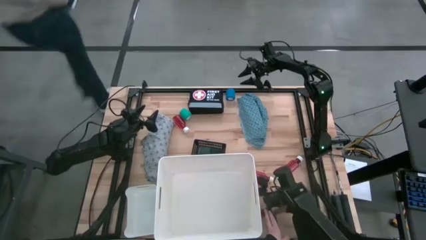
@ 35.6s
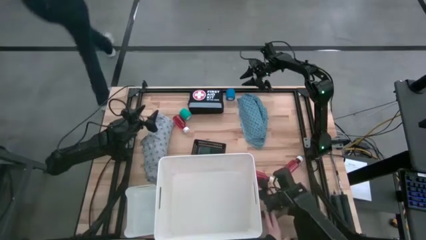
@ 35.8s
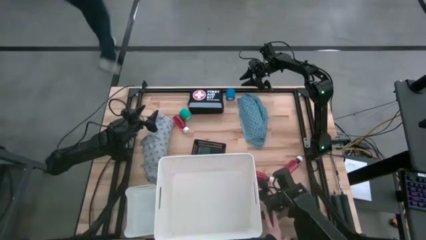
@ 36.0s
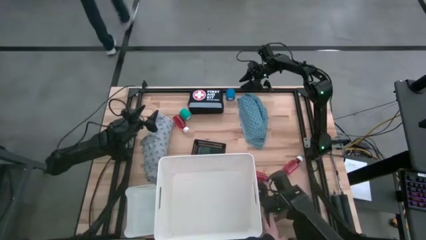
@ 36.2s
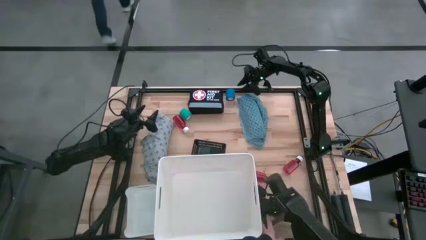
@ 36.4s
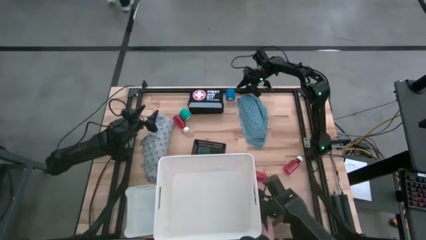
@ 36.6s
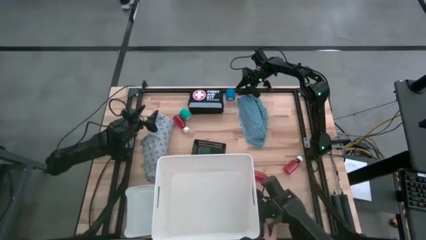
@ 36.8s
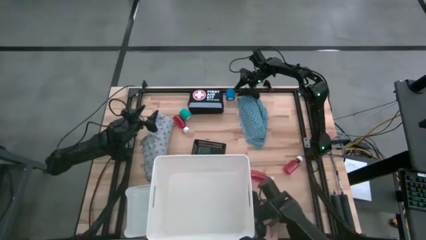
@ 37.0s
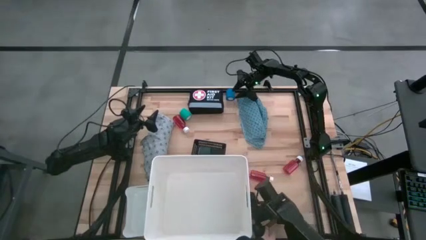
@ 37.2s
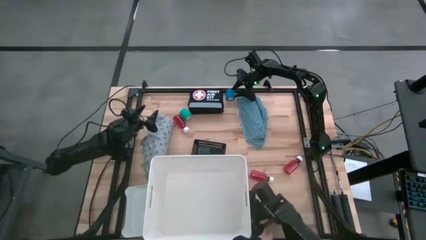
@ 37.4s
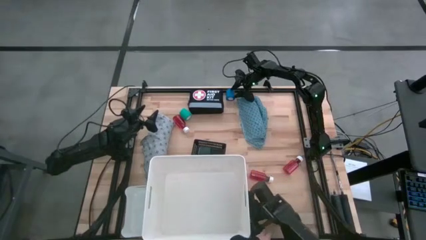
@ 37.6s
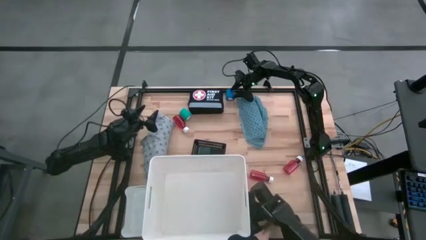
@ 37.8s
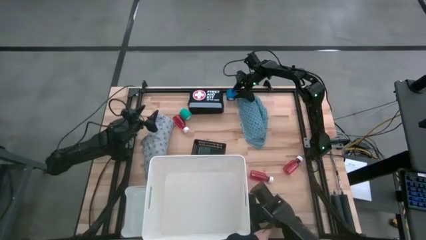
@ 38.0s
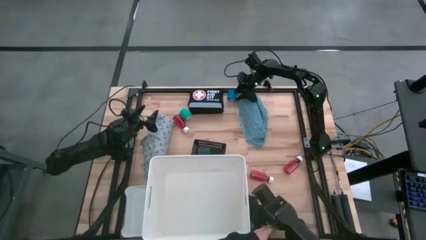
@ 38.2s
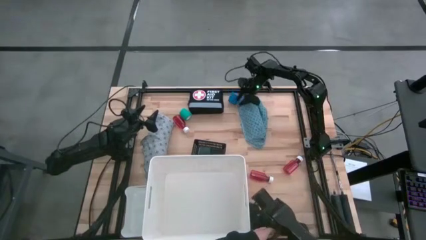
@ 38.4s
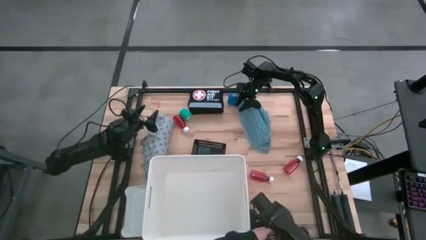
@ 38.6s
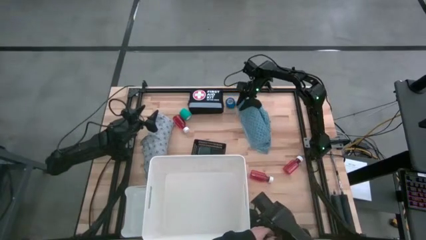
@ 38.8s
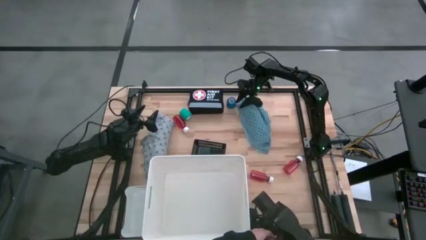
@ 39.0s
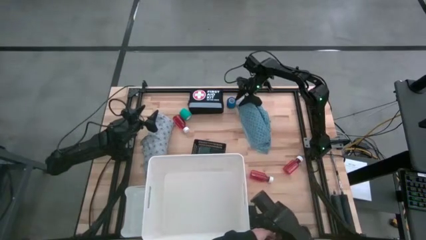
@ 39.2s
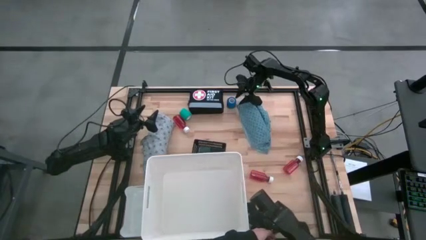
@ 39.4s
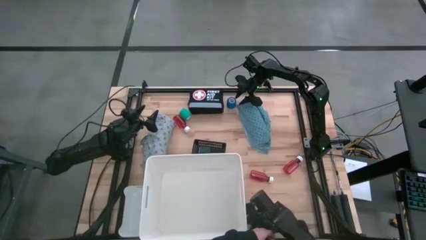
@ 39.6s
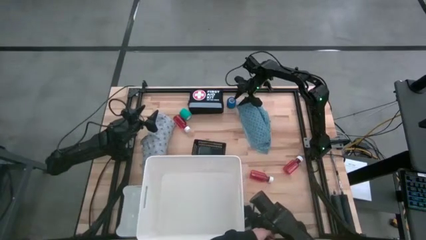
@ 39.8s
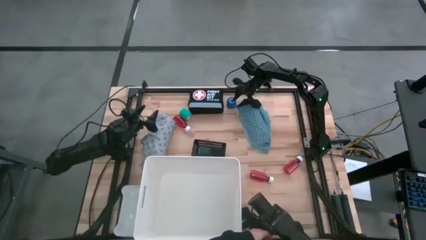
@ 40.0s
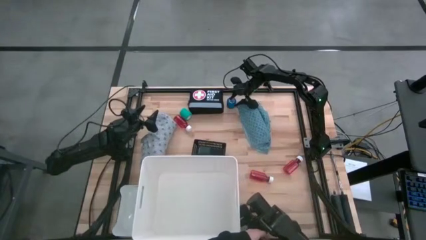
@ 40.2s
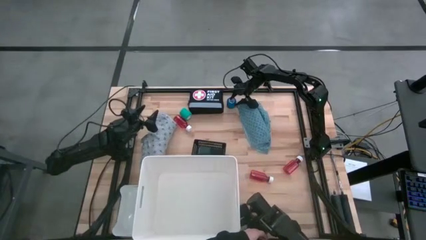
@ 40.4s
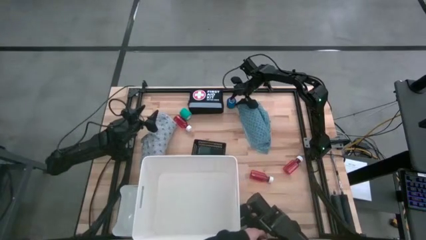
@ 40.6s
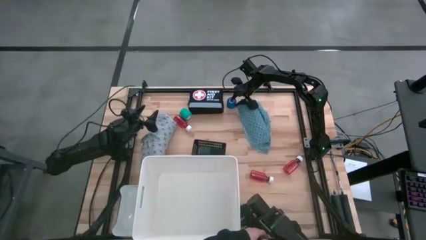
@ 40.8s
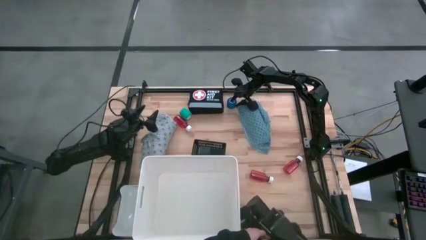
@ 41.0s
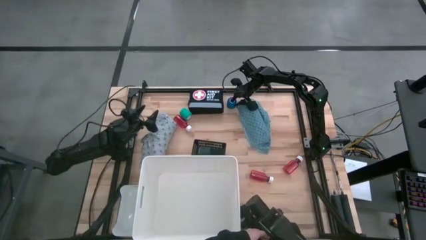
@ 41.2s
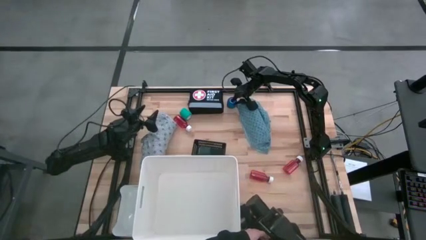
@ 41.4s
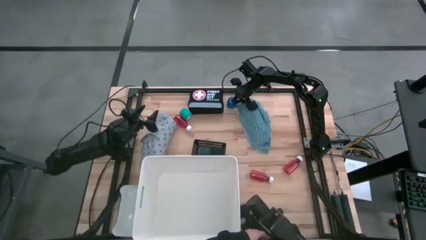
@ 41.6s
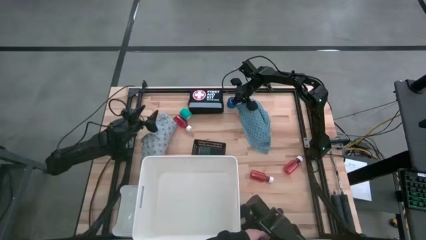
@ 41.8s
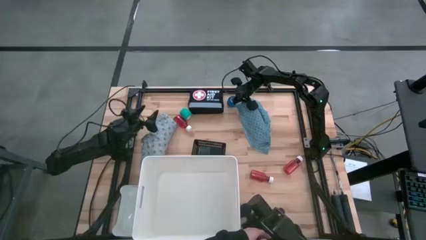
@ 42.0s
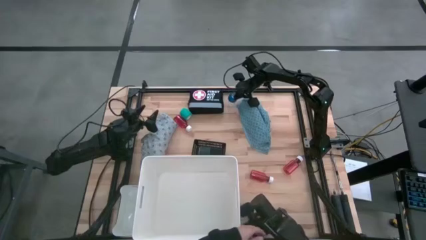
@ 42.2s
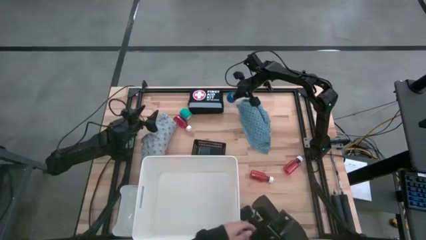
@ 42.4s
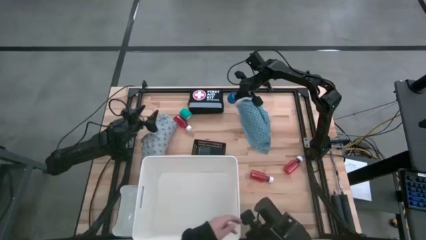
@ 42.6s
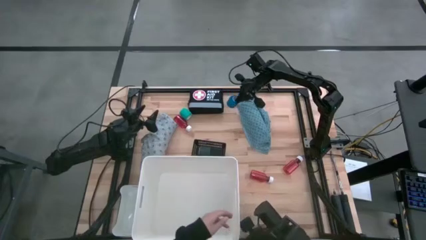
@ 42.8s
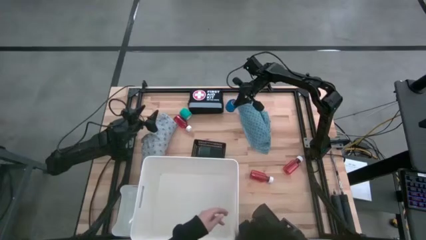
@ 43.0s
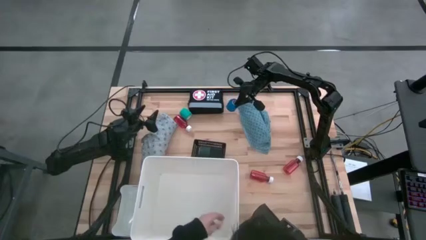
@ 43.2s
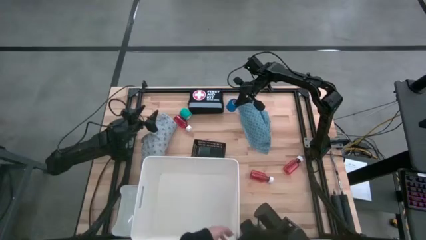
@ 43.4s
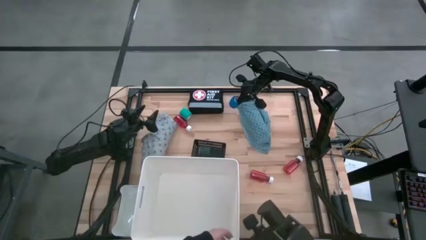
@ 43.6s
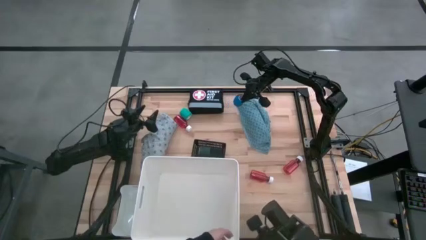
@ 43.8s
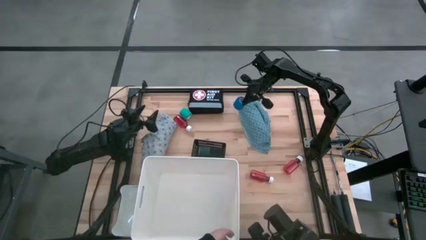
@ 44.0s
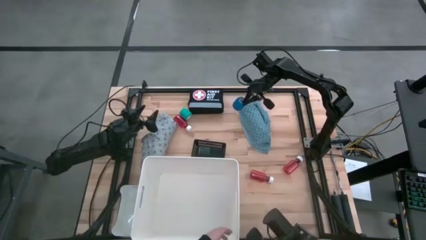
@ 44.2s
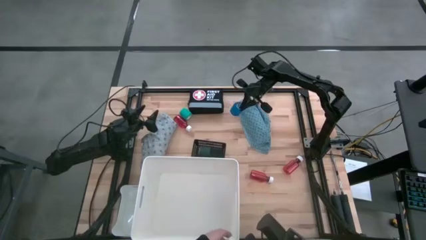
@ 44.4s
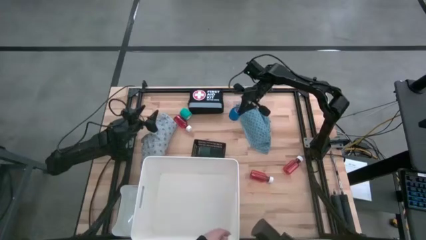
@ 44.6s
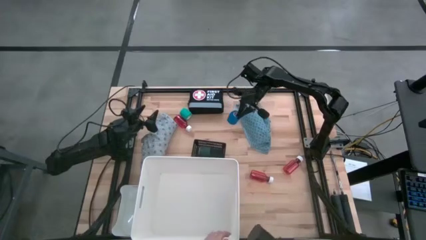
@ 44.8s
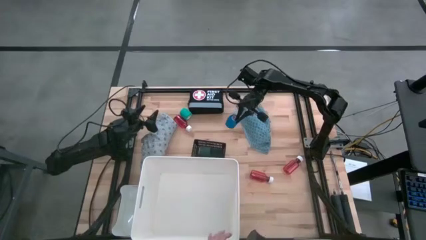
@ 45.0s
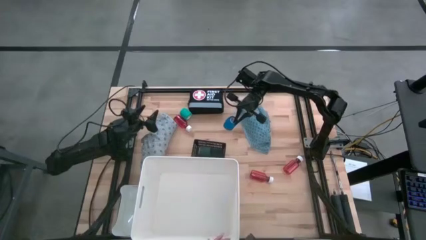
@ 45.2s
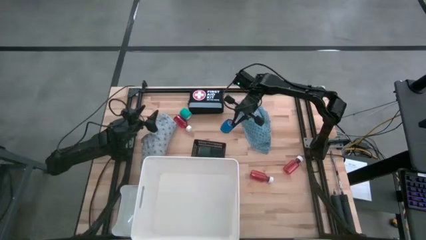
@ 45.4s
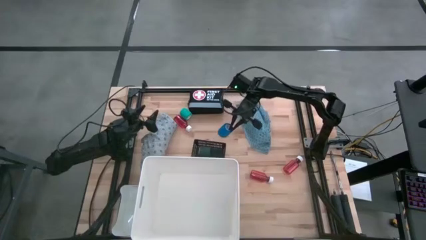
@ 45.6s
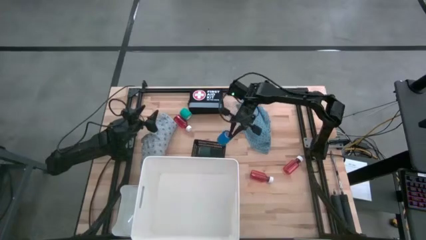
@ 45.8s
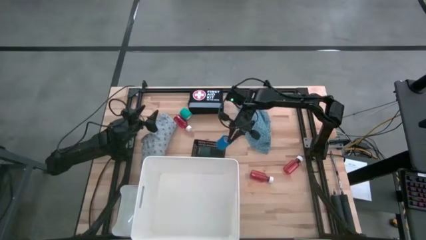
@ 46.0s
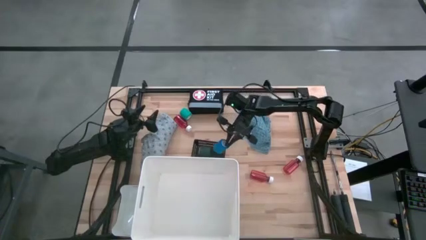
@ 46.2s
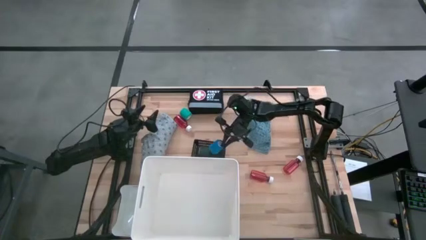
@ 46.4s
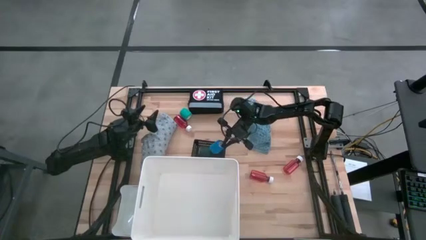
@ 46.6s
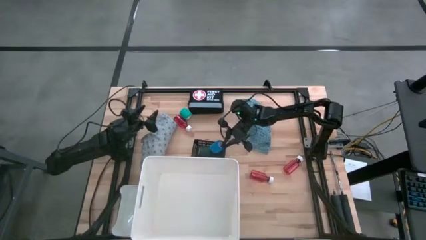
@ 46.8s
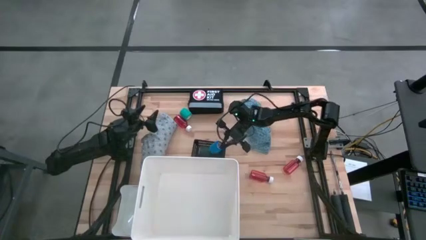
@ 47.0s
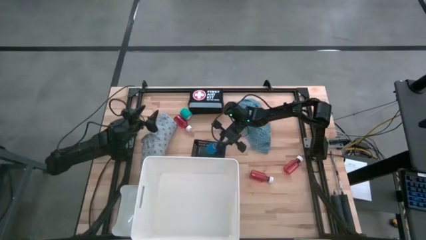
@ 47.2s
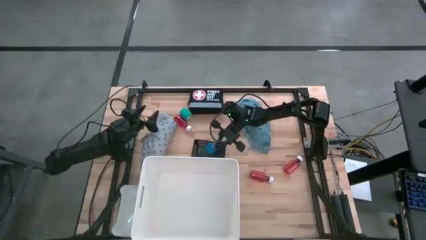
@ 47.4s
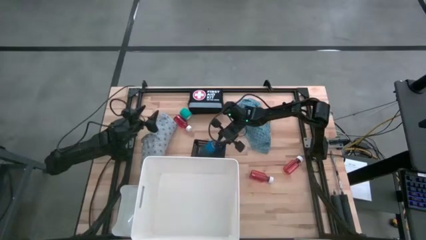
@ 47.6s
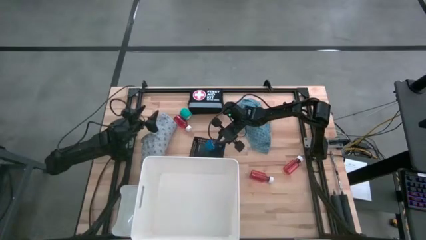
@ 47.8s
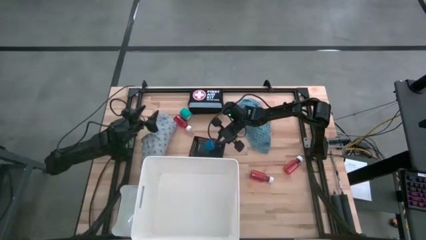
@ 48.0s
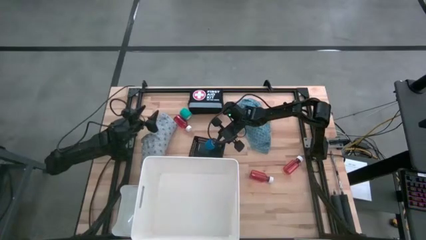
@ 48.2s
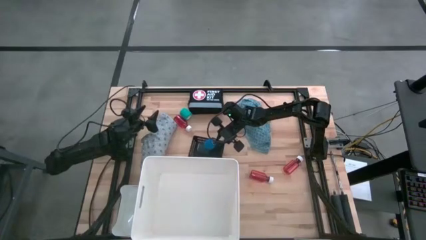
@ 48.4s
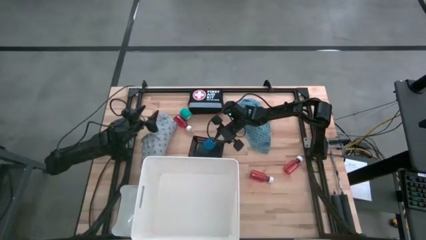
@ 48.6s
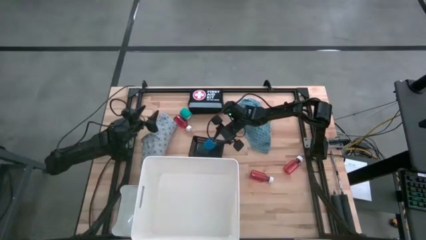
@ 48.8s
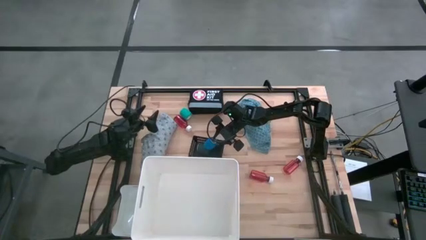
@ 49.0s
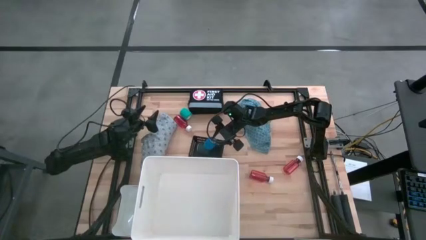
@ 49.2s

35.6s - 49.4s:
Task: Pick & Place Medicine items
Put the blue bandage into the black bin
